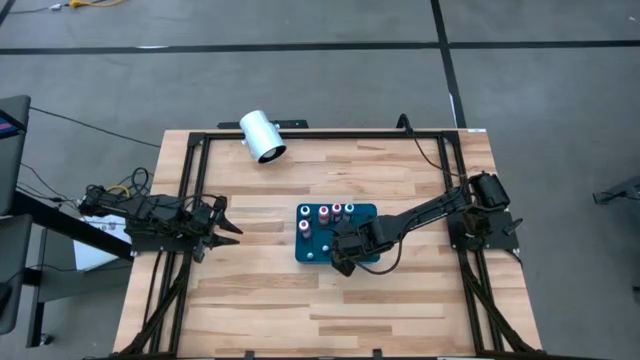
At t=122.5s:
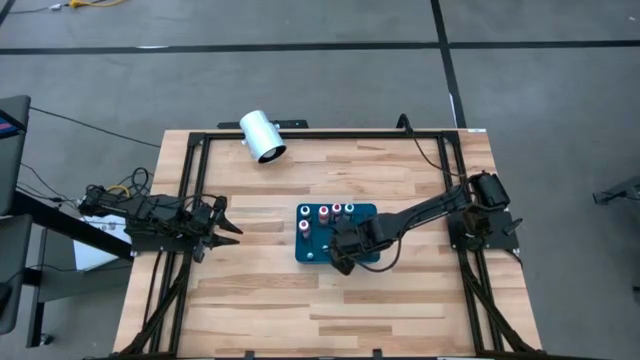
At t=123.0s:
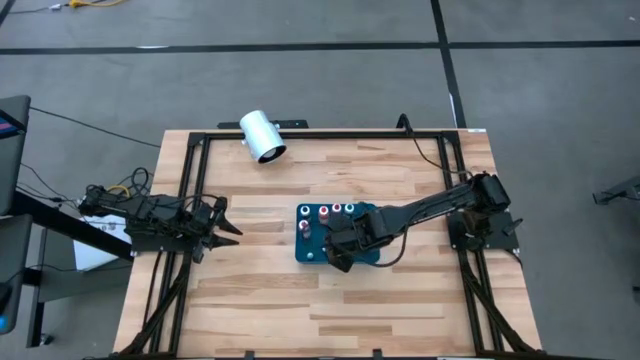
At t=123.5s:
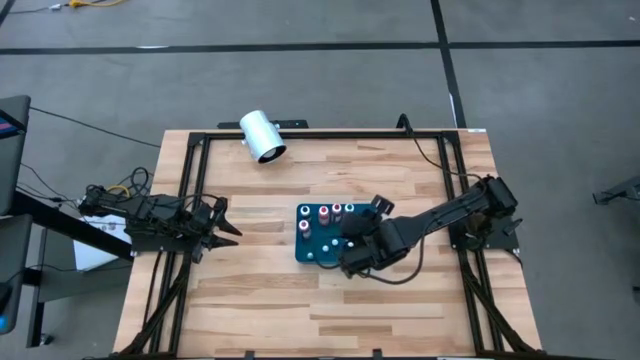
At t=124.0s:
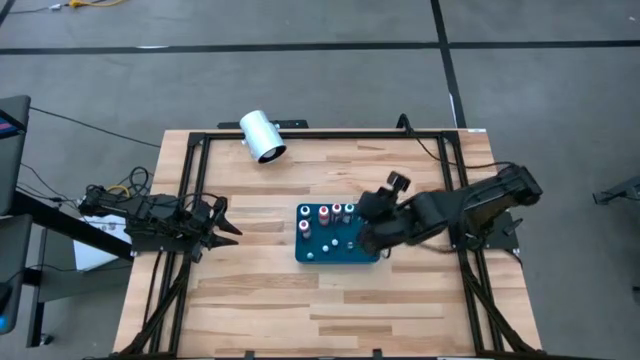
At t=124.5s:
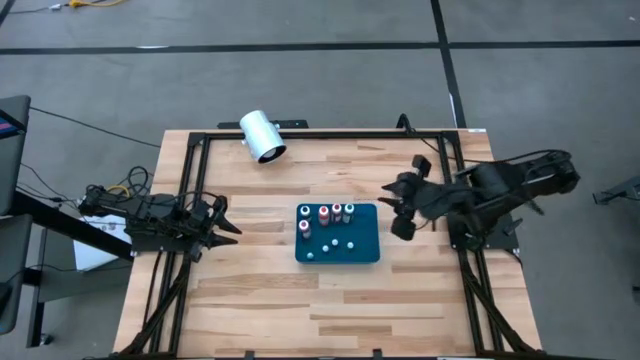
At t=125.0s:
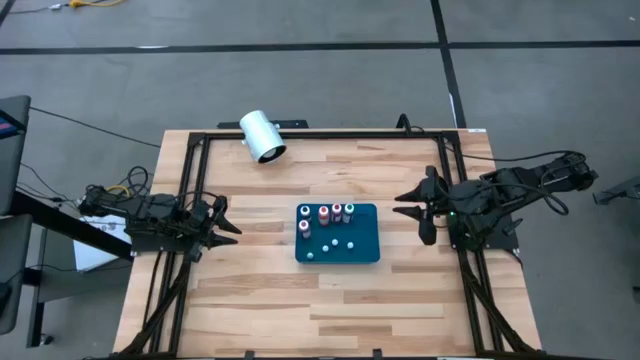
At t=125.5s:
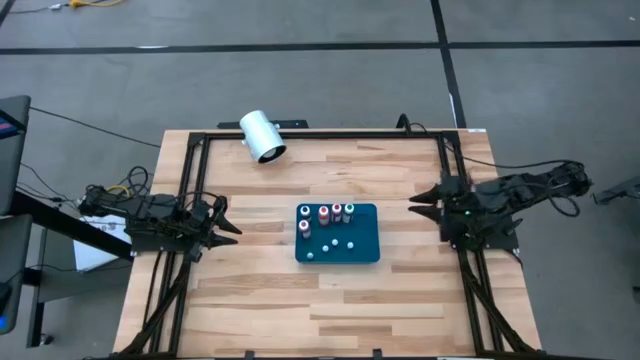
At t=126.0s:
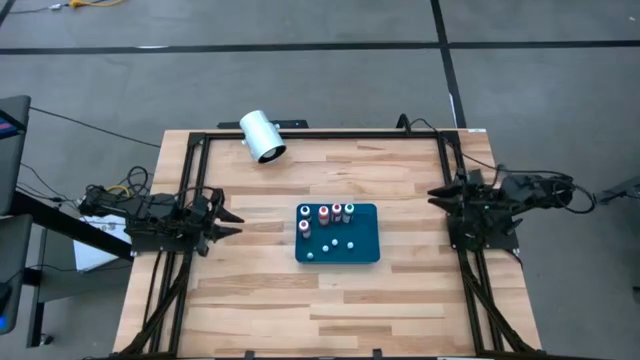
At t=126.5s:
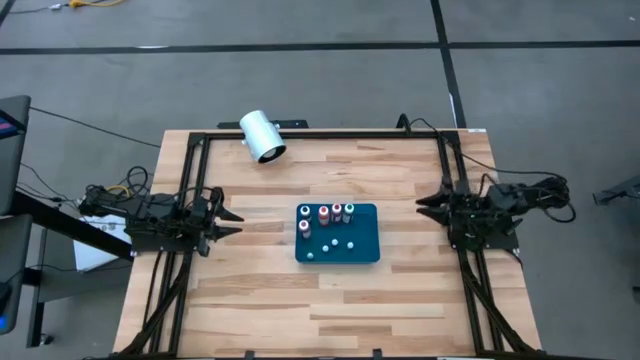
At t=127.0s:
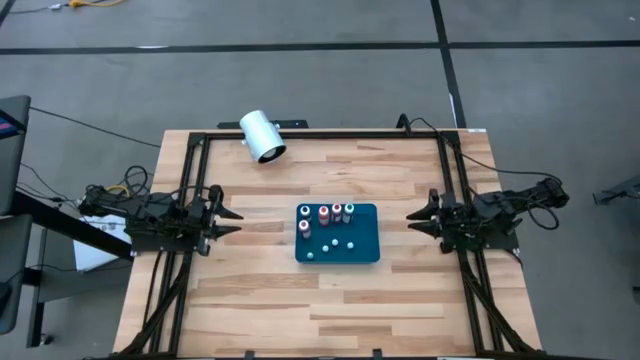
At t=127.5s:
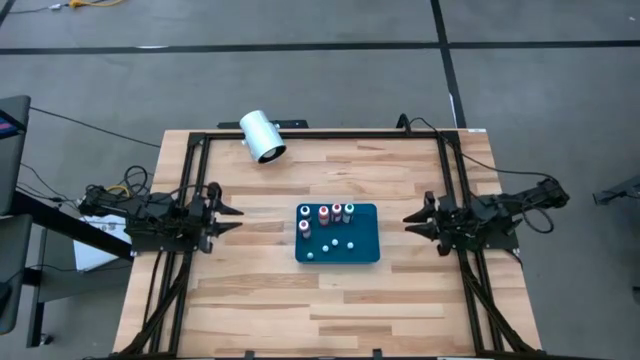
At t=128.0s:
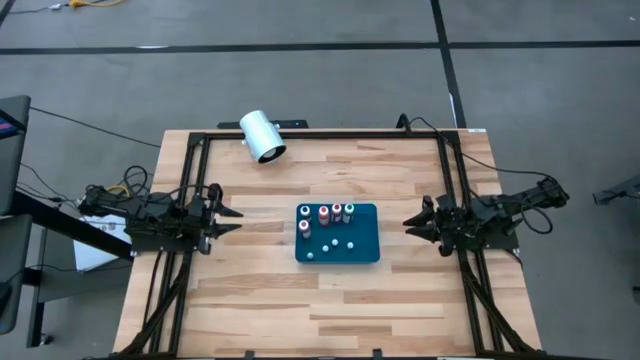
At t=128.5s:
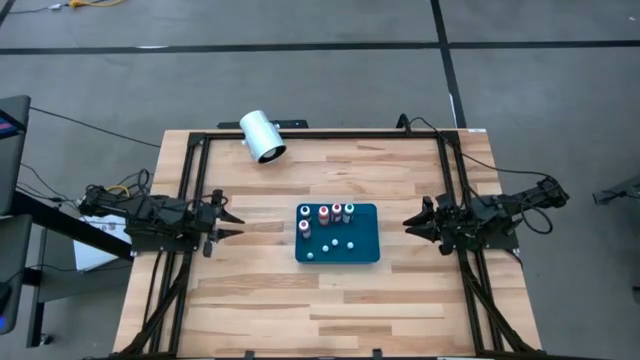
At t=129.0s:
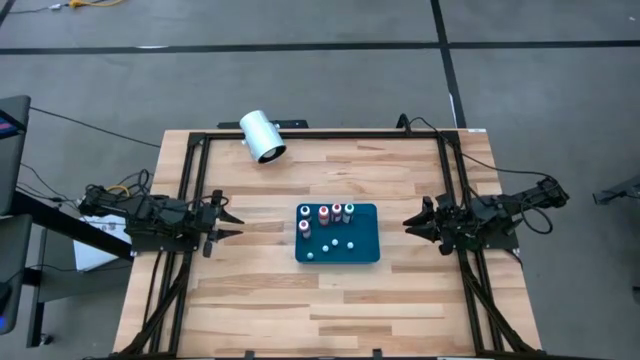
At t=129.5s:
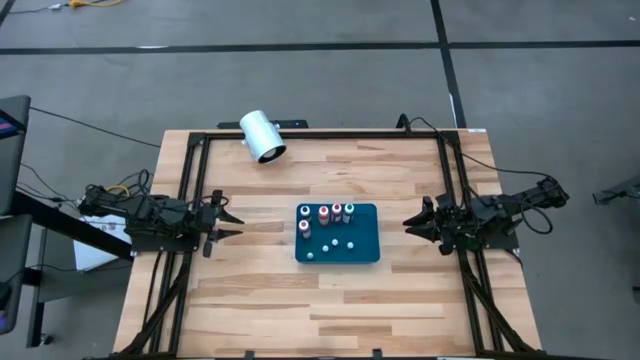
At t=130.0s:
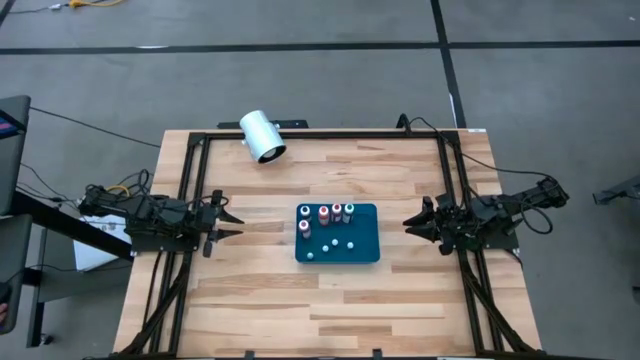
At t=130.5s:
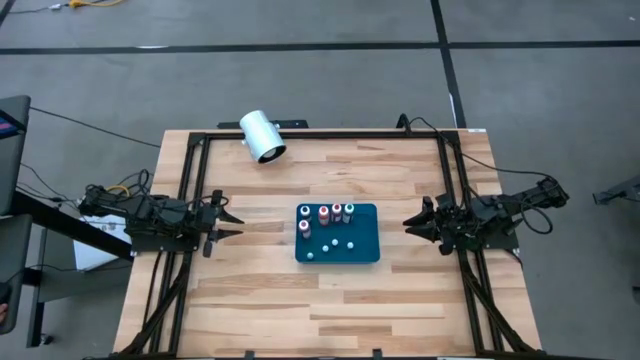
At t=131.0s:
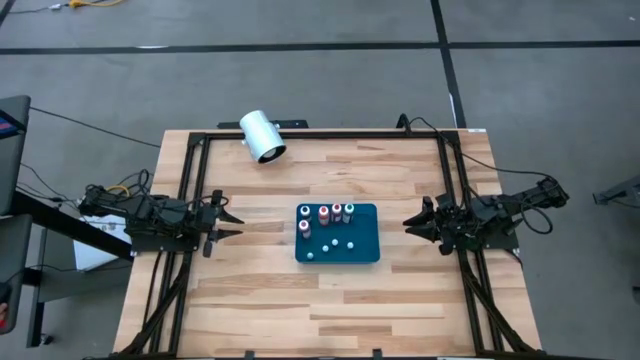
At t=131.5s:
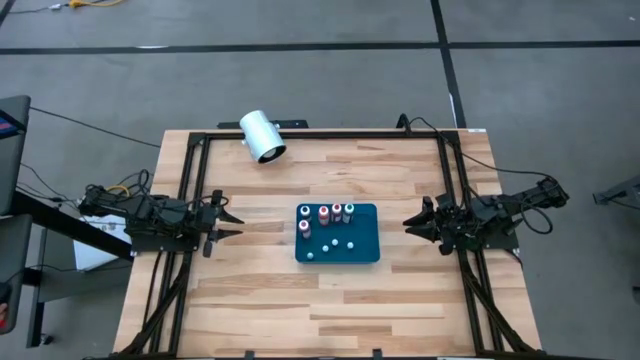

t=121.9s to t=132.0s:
Task: Pick & Place food coloring
Return to Home Position

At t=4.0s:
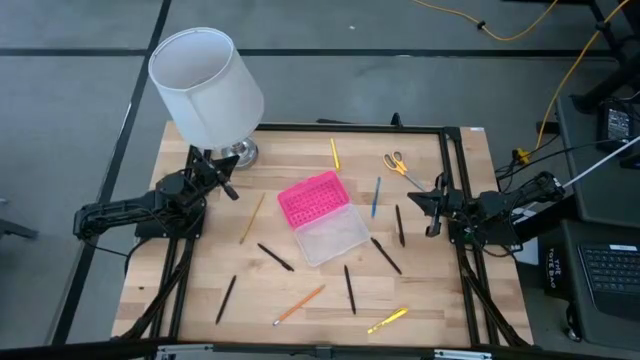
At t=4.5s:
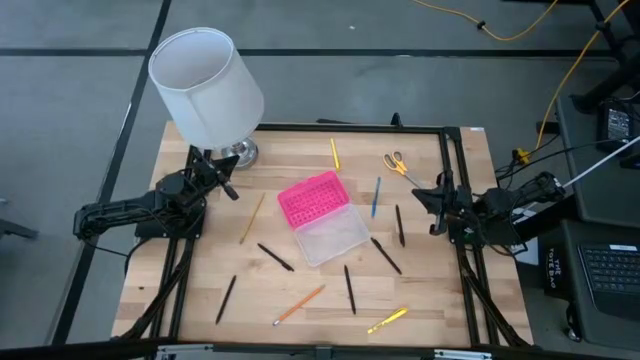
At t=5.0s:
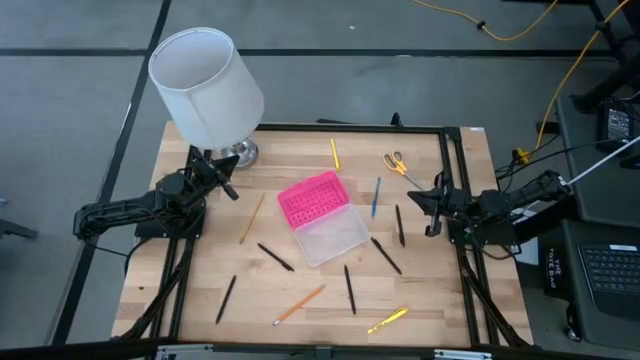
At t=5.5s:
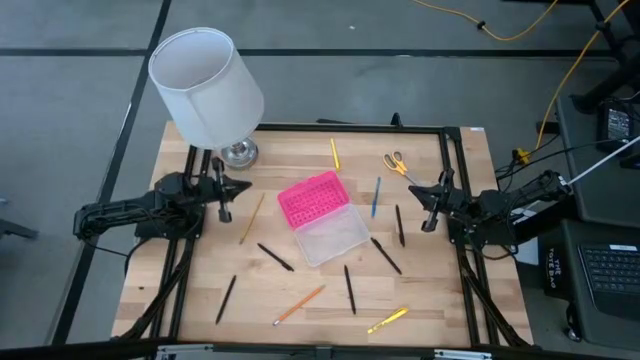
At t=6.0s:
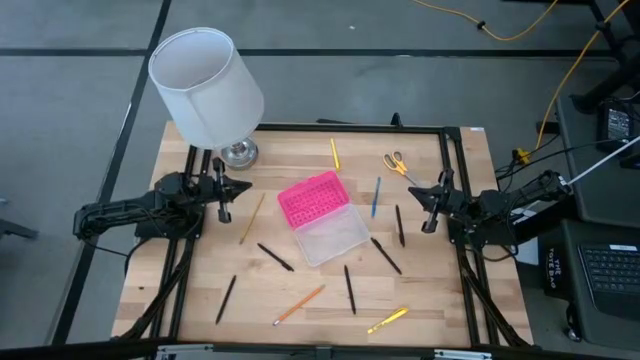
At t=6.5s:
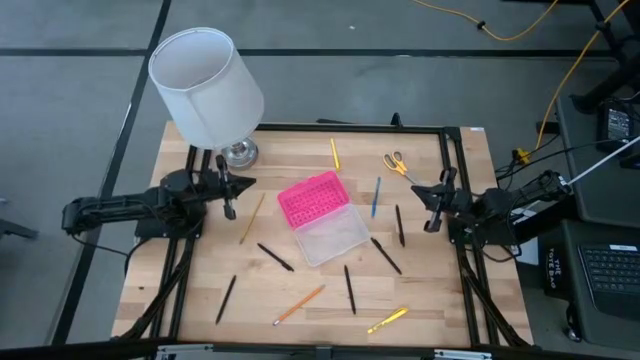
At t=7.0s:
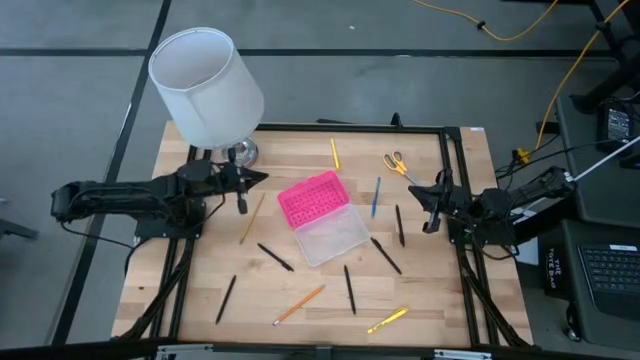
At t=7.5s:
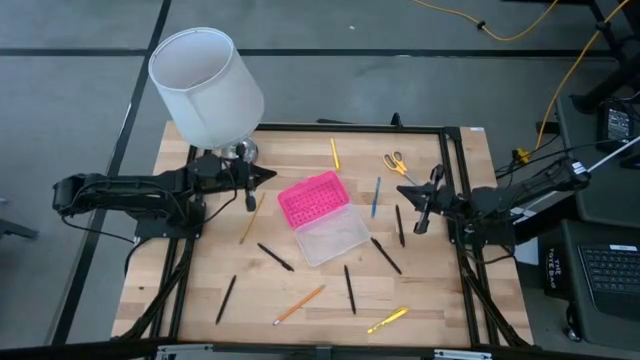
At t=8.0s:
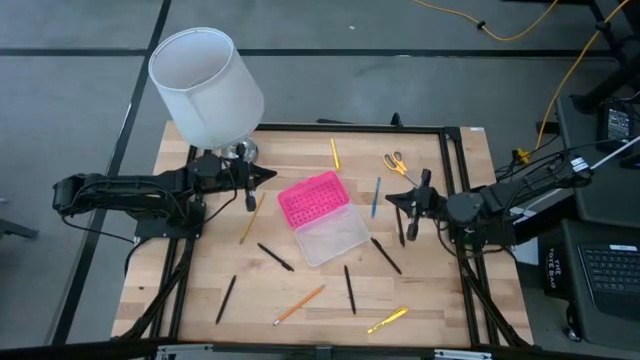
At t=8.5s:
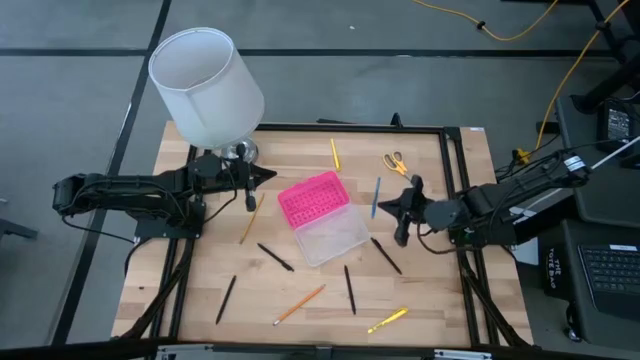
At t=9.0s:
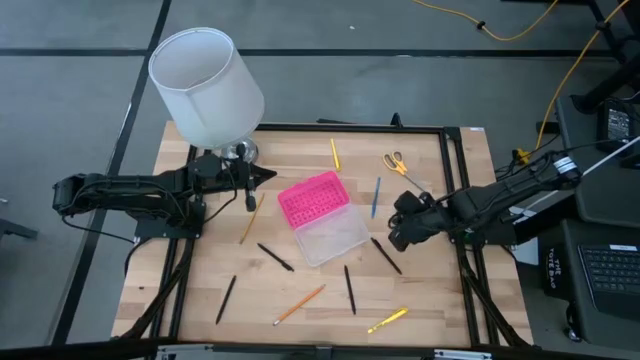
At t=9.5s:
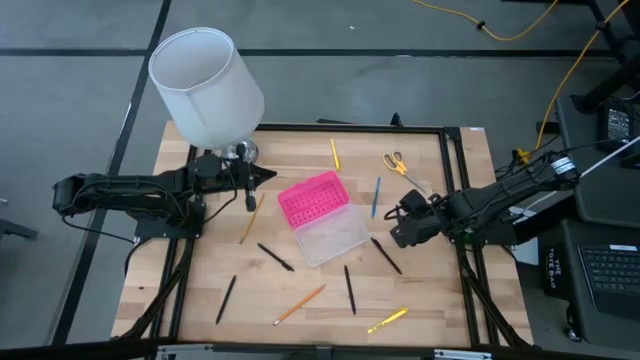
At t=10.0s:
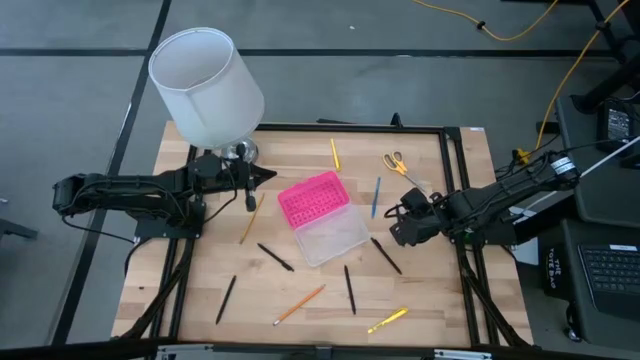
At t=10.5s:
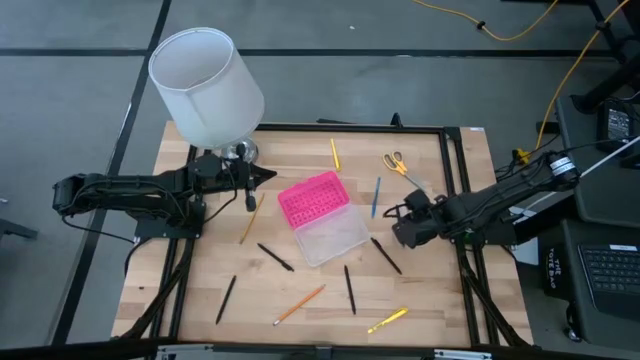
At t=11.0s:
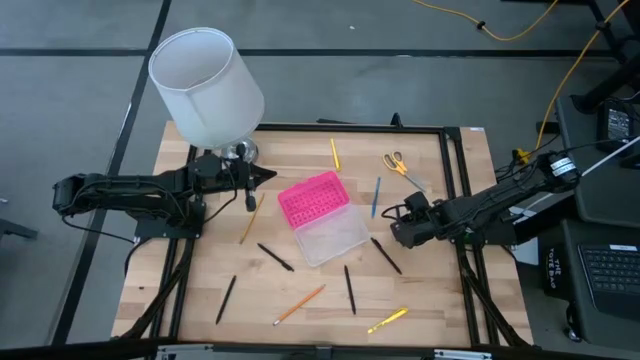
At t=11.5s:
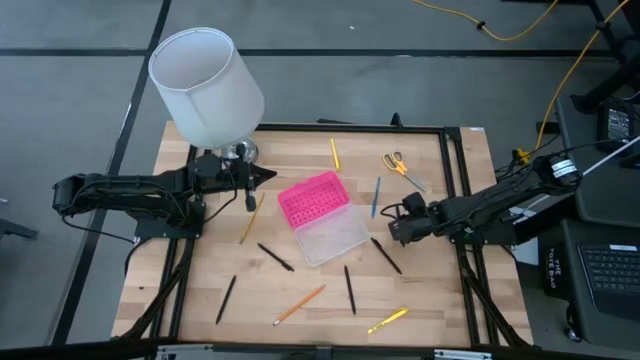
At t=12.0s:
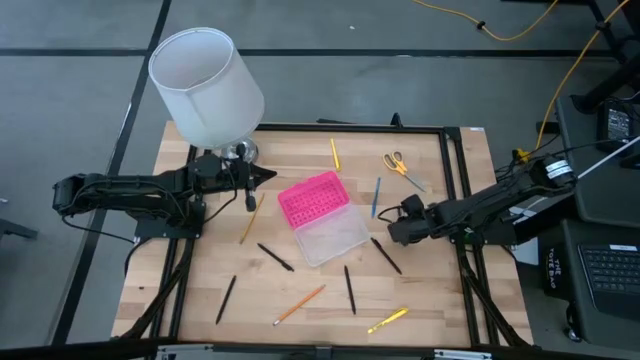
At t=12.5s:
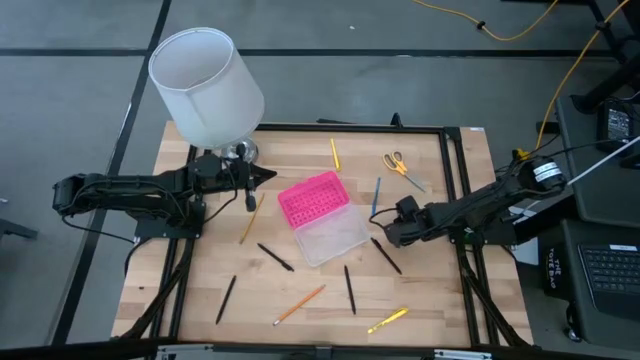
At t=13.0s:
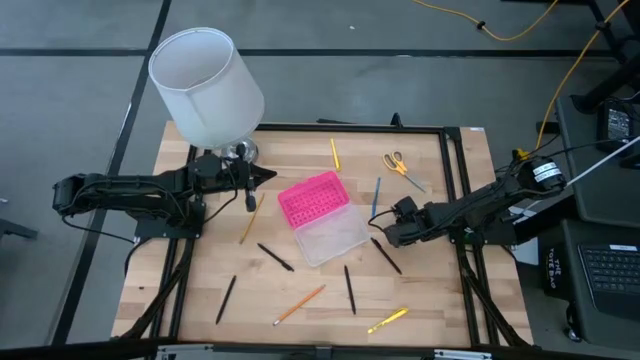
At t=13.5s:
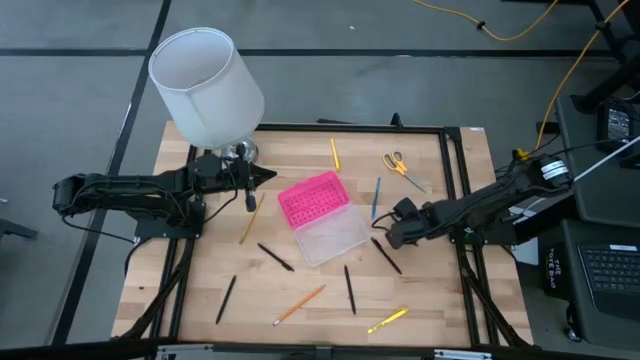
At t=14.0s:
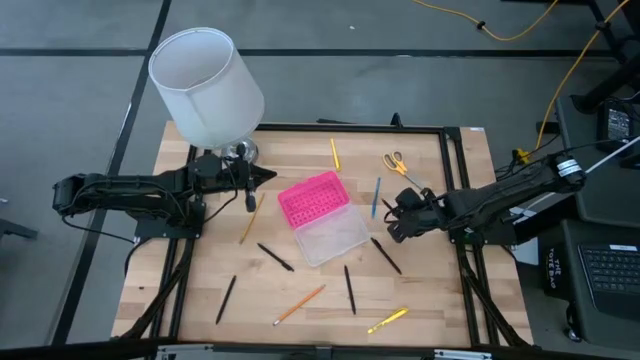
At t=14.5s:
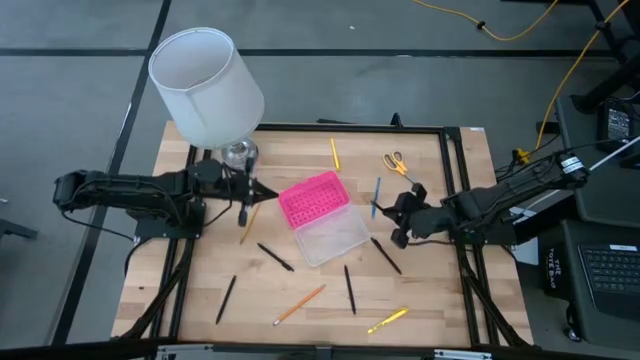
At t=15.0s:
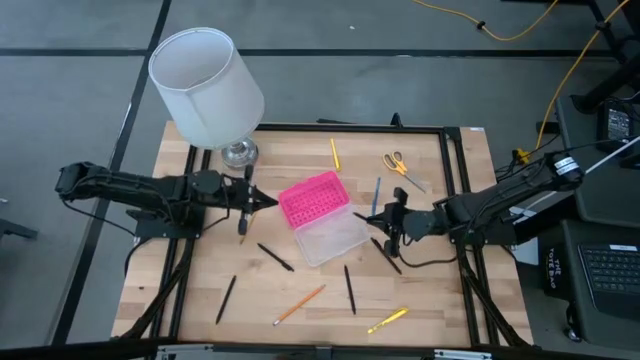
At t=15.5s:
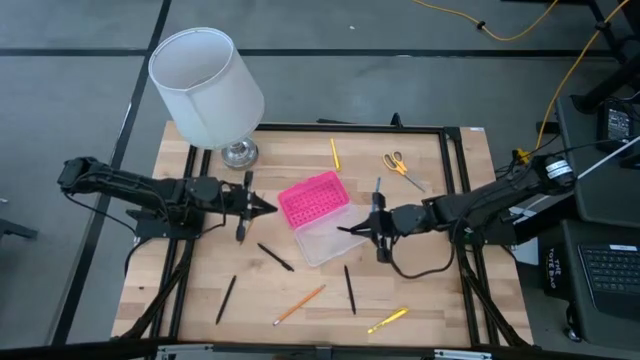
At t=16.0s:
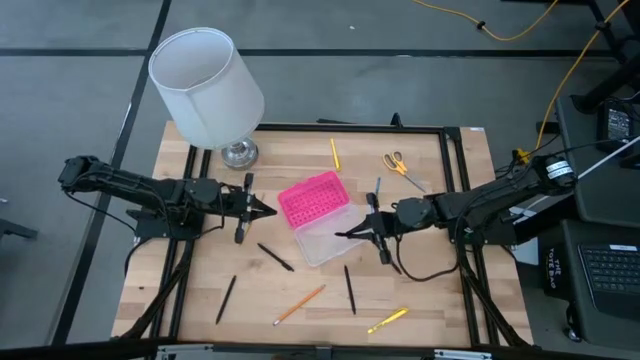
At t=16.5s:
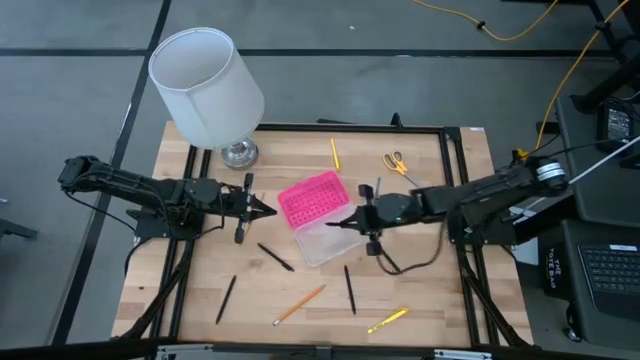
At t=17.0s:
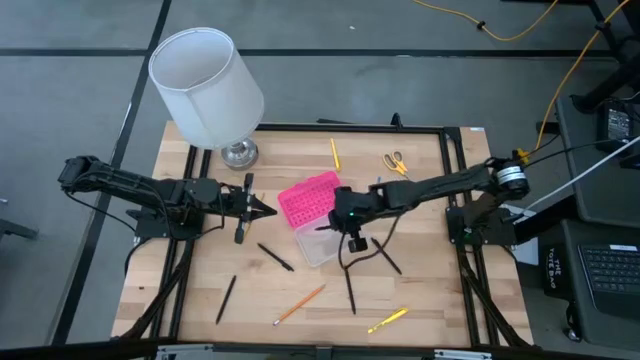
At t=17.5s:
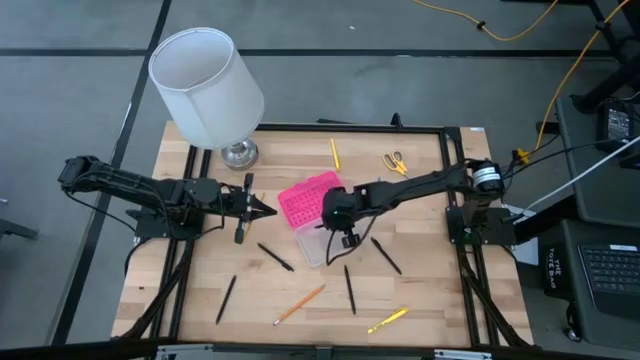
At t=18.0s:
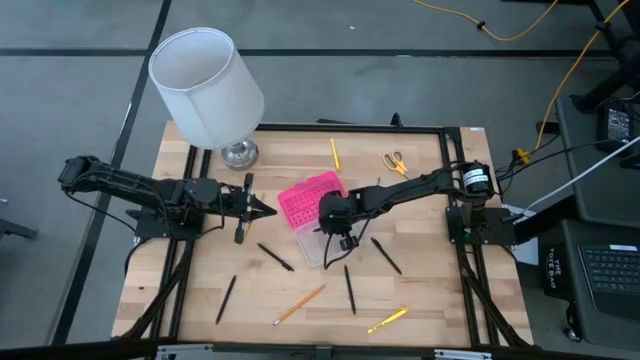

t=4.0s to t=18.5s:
Task: Pick & place school supplies into a supply box
Put the black pen into the supply box
